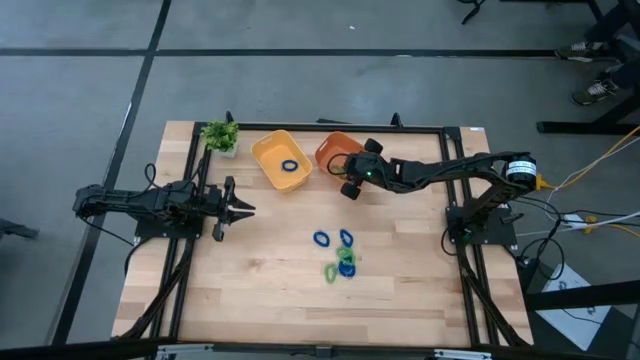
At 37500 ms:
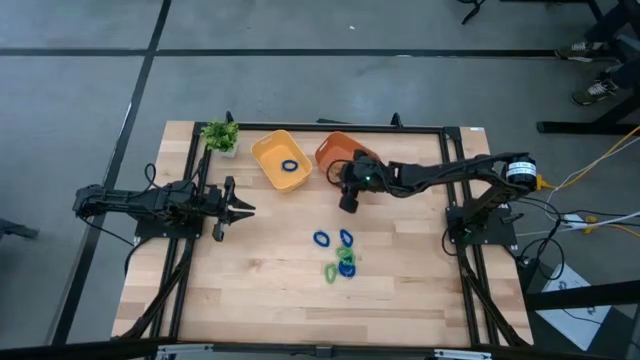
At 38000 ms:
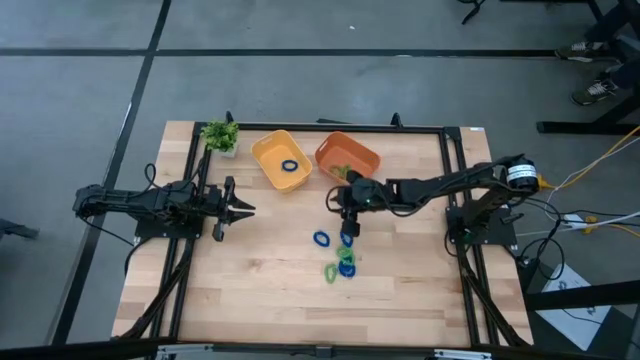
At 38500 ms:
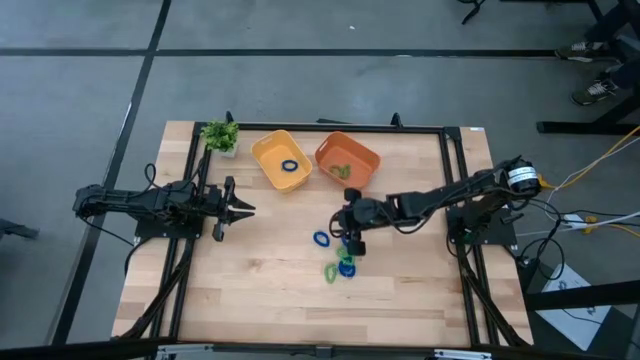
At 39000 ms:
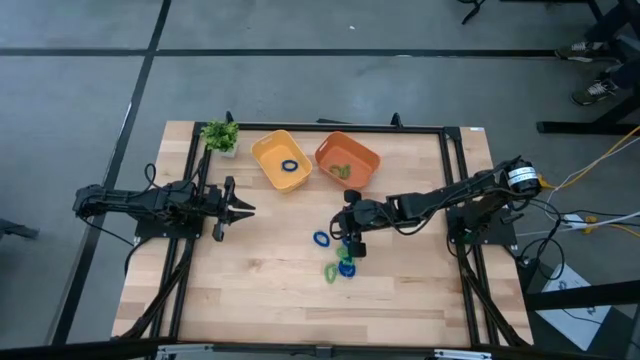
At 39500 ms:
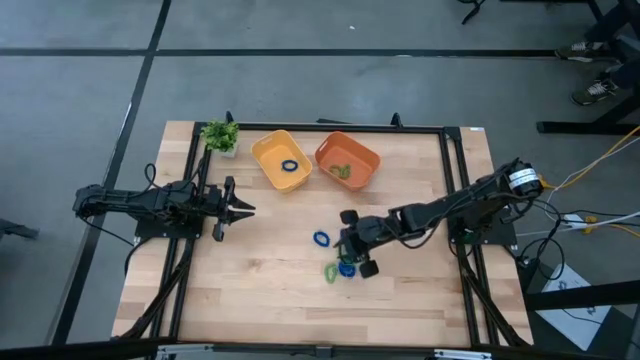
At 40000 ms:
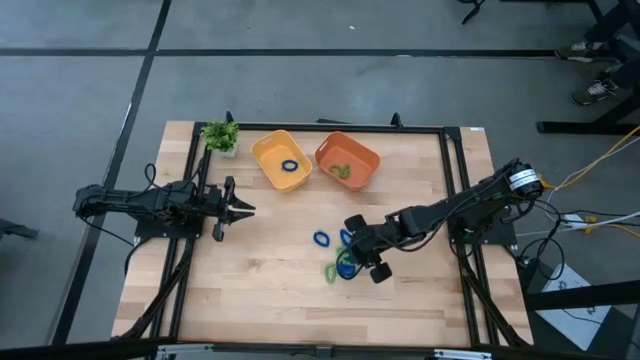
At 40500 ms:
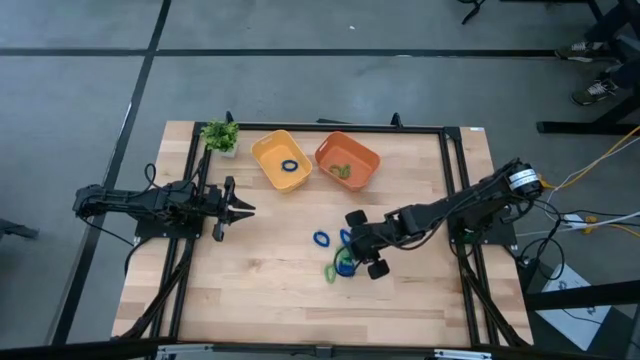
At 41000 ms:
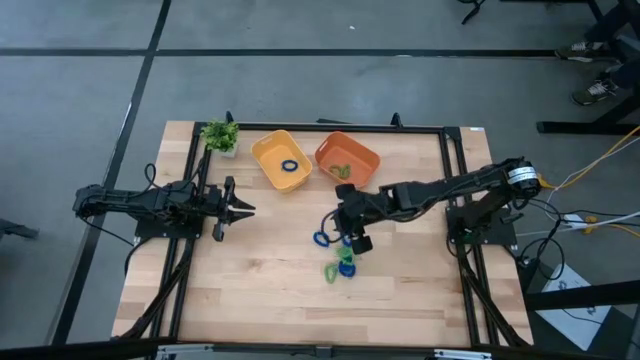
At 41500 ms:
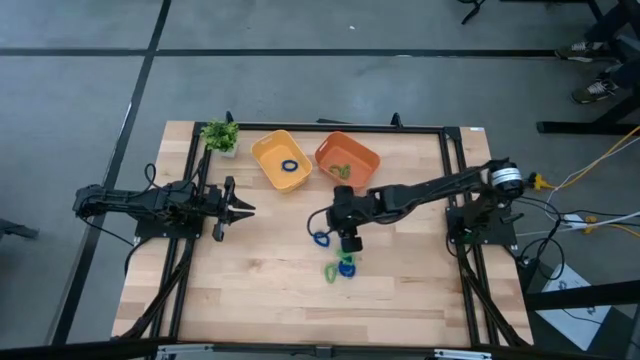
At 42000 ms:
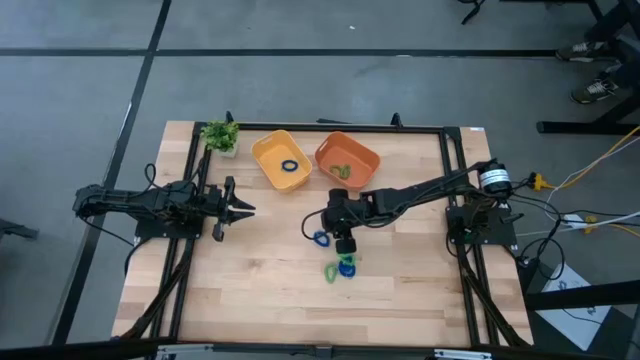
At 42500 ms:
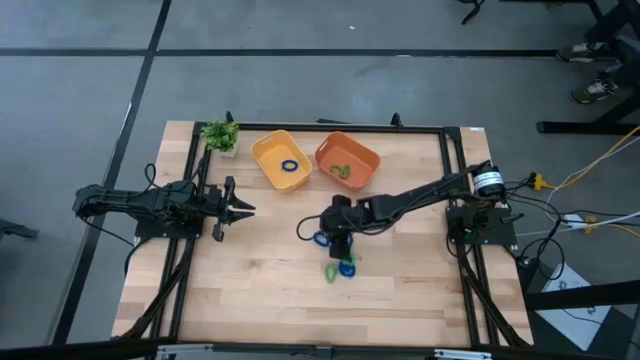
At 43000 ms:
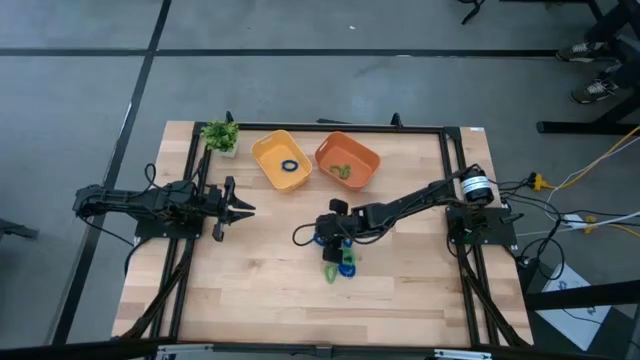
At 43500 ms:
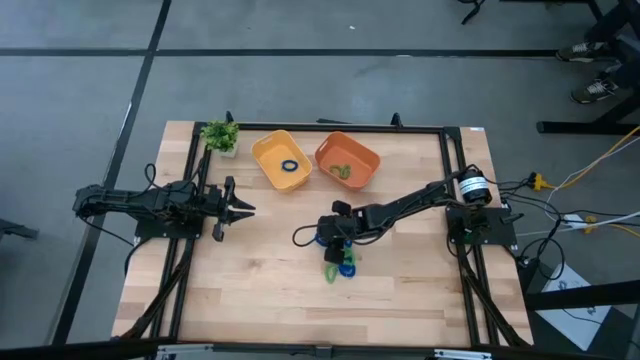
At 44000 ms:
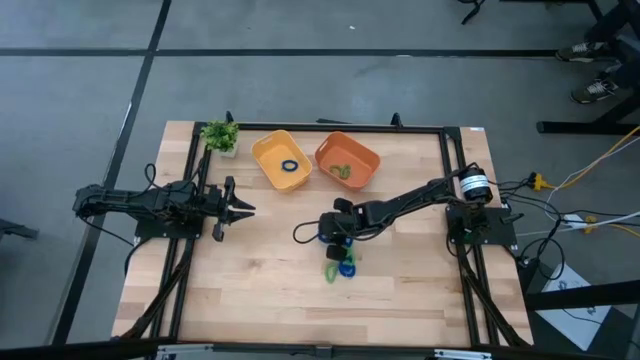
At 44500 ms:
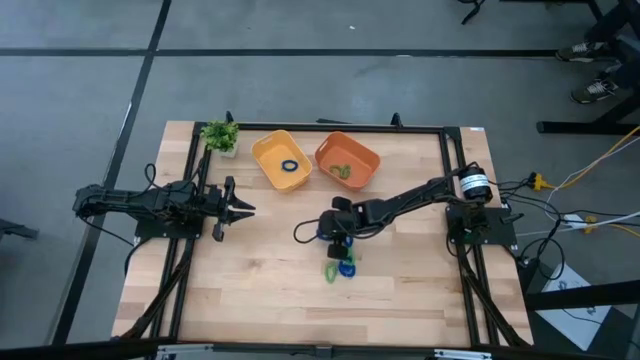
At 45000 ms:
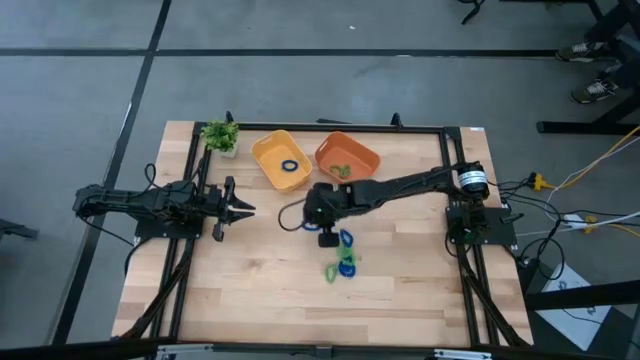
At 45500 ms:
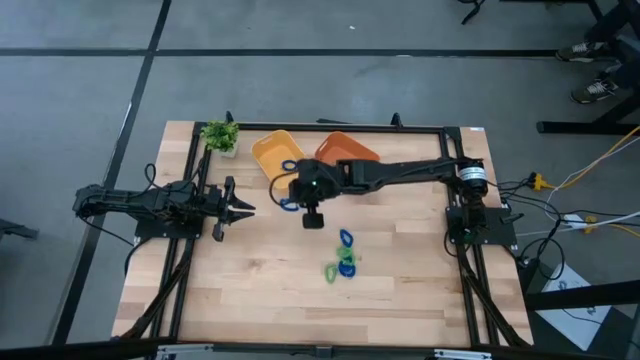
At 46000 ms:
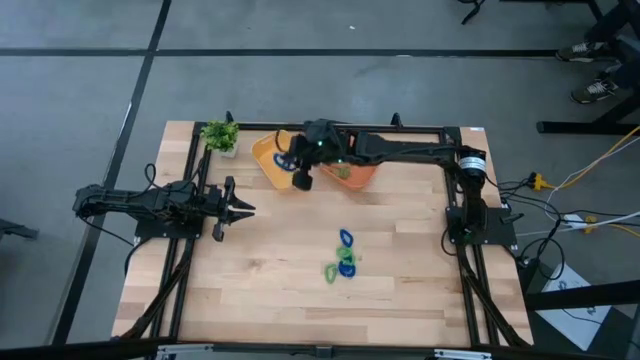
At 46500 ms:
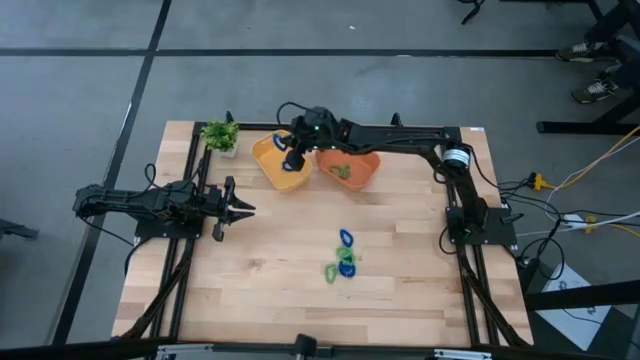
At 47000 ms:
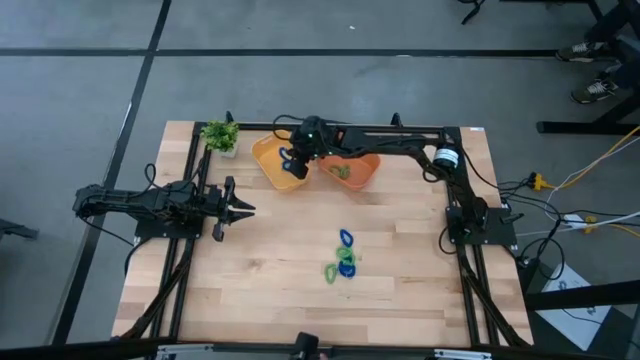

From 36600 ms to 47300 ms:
Task: Sort spring keychains
Put the blue spring keychain into the yellow bin

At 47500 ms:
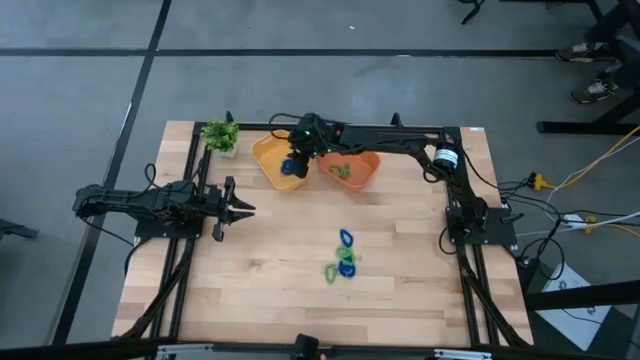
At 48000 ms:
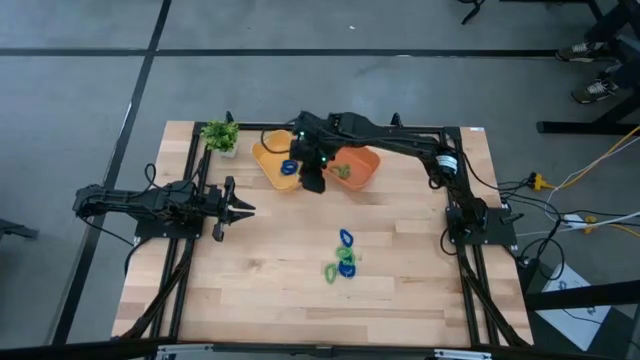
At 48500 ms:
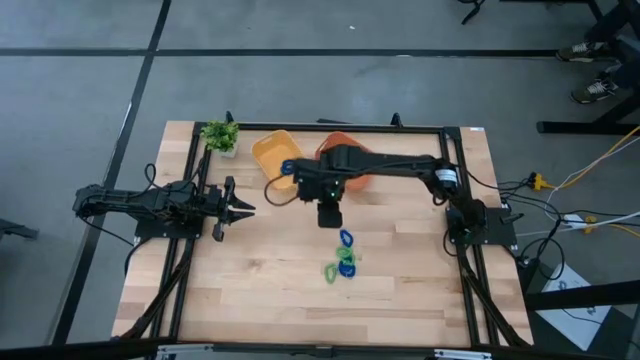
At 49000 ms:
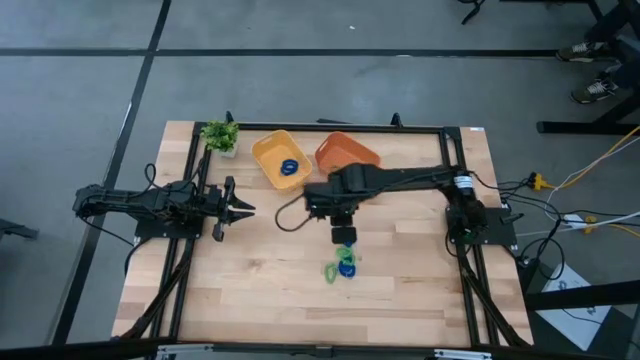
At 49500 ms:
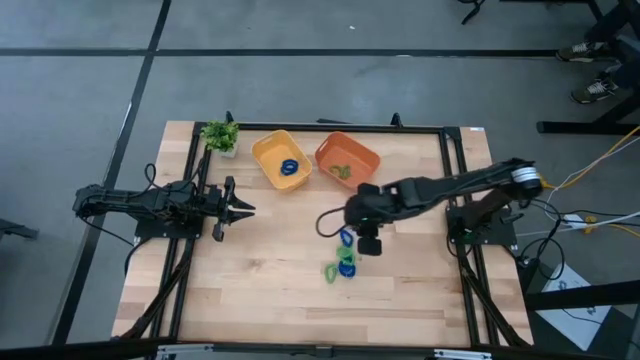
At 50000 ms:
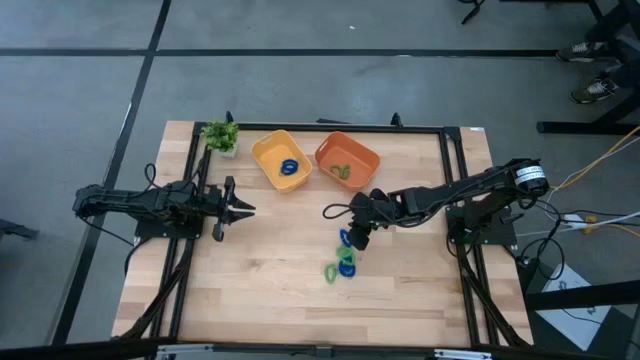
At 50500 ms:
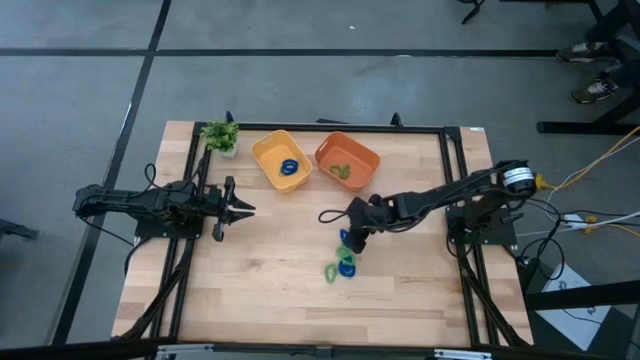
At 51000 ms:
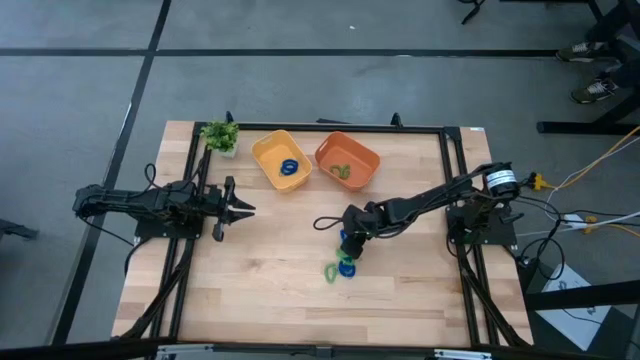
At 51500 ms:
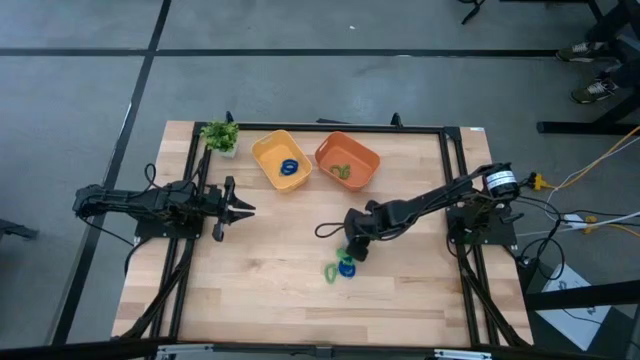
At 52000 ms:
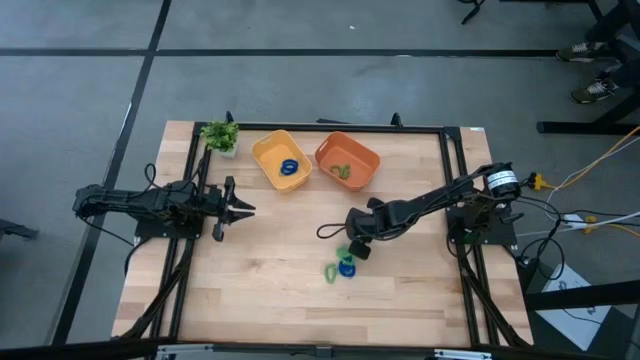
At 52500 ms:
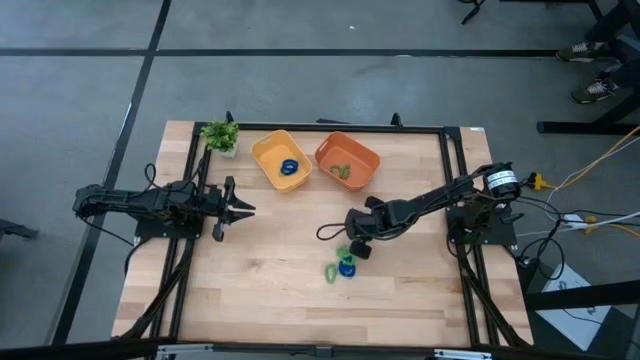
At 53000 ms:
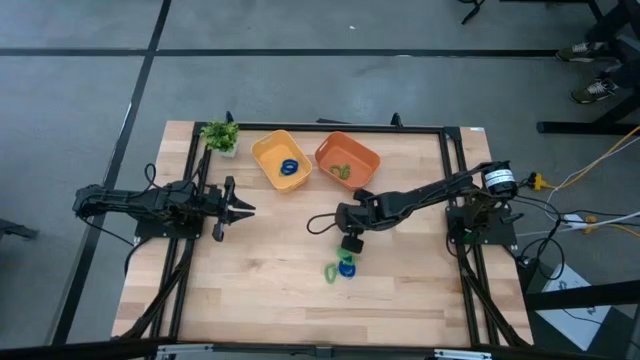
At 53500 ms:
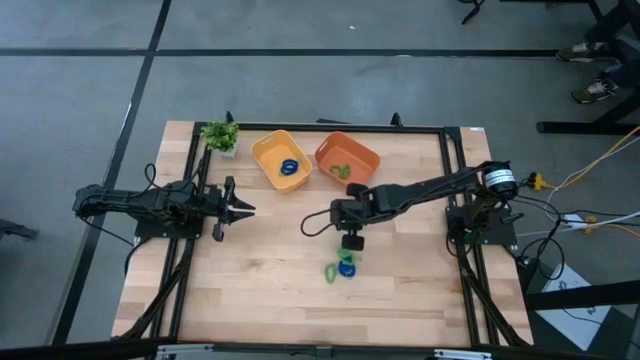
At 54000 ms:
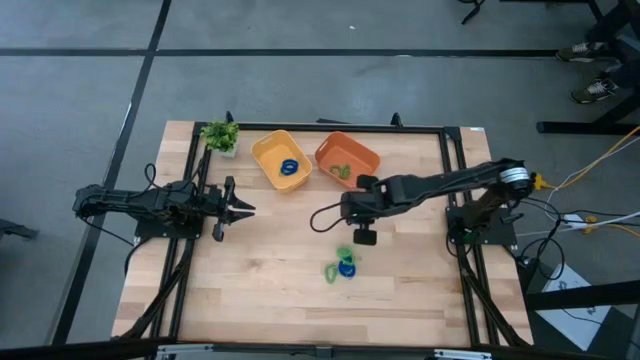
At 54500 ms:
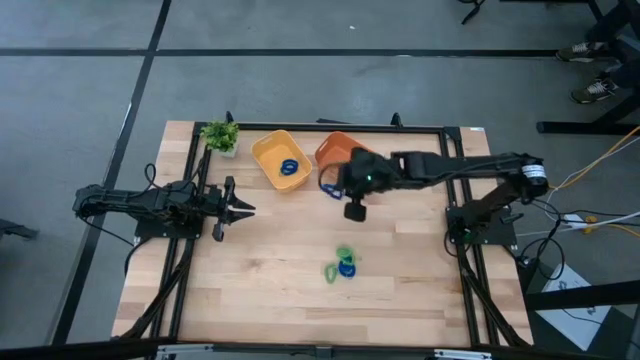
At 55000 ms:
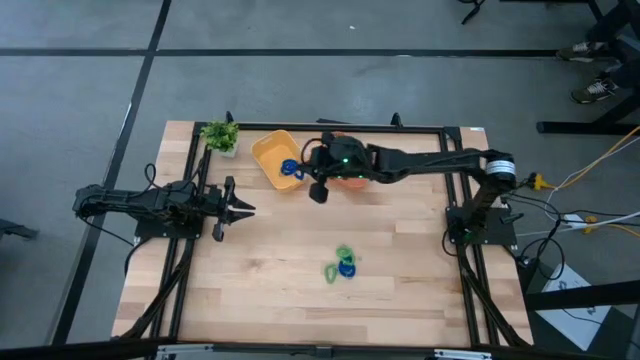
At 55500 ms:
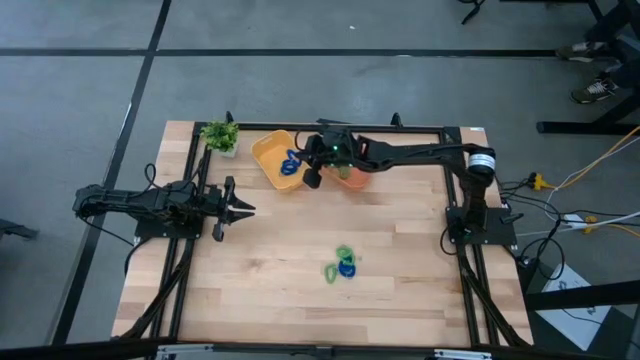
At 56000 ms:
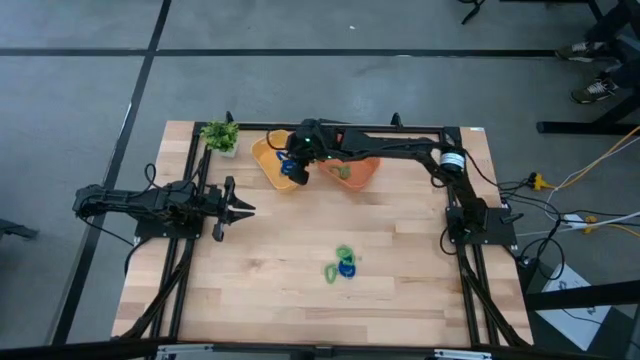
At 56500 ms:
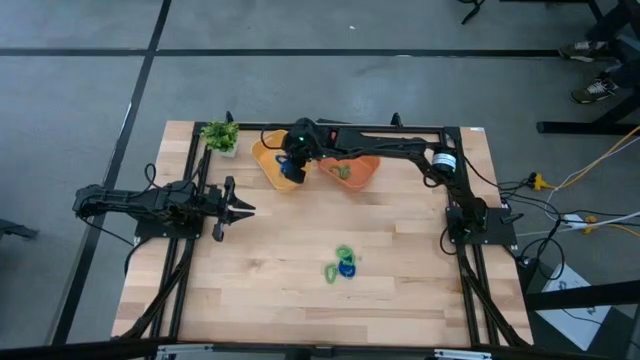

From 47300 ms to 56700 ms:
Put the blue spring keychain into the yellow bin
